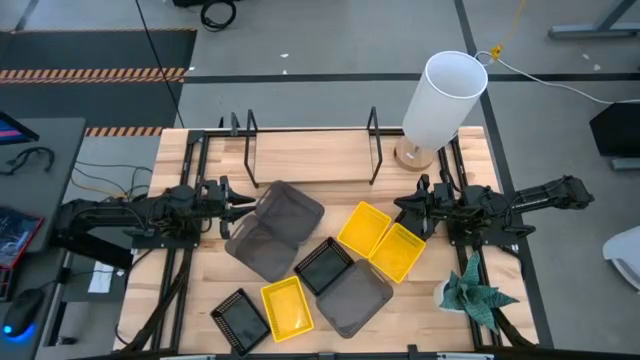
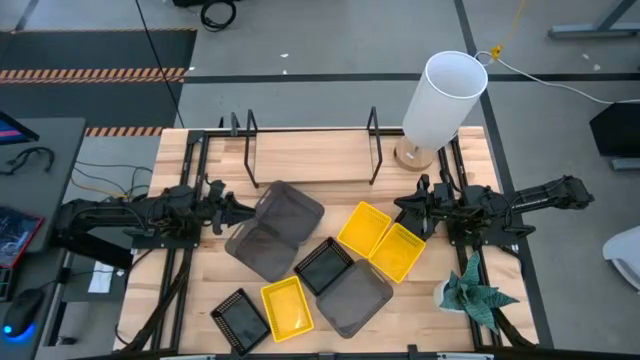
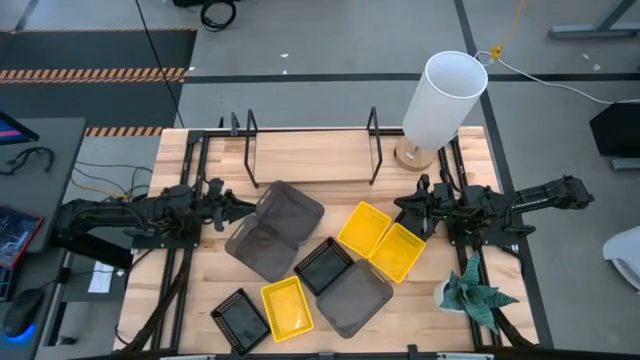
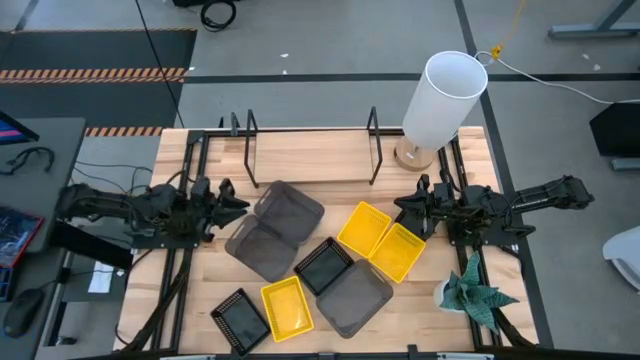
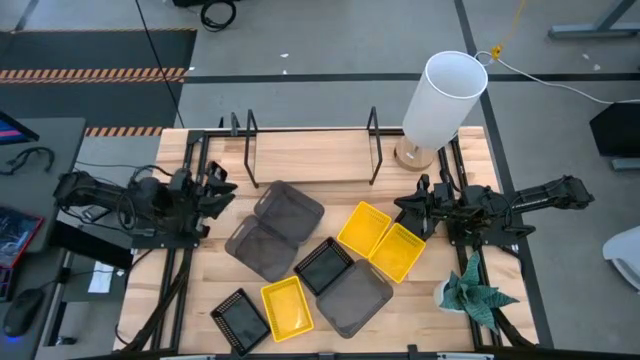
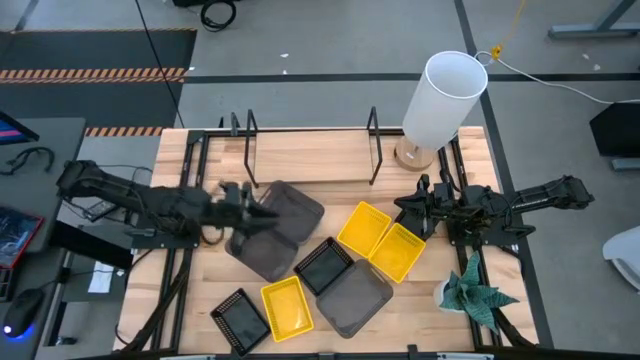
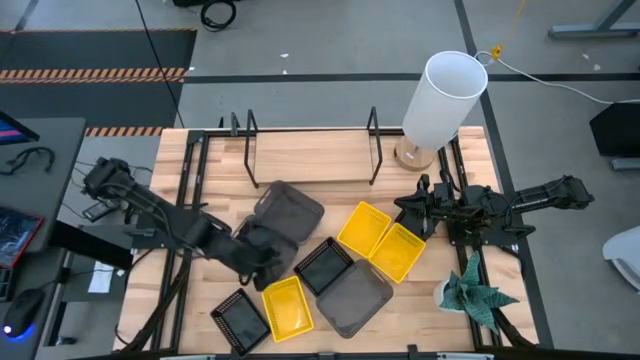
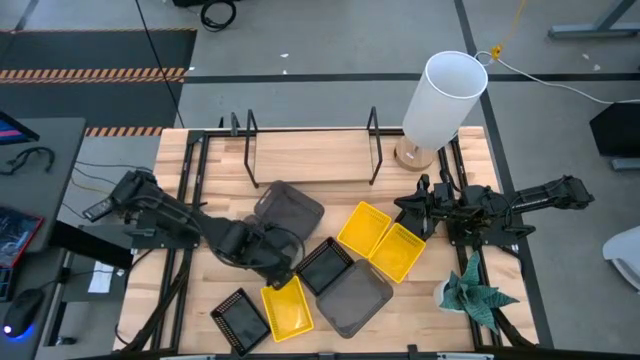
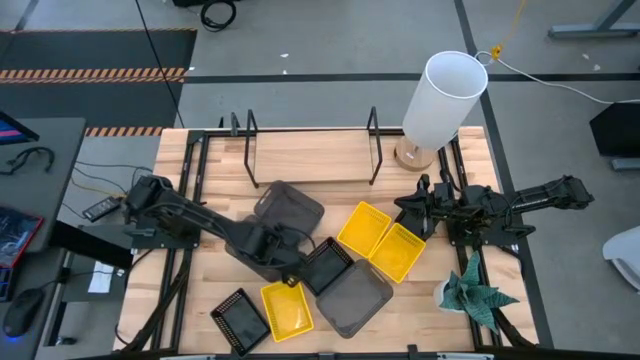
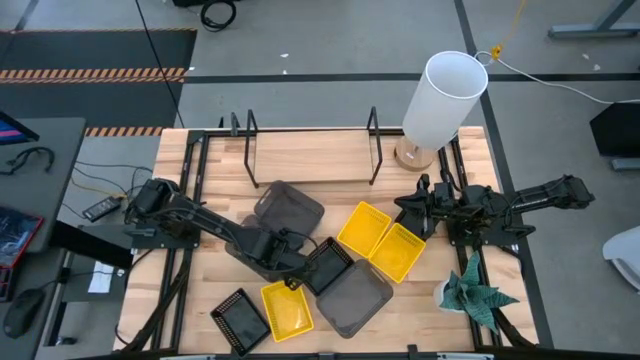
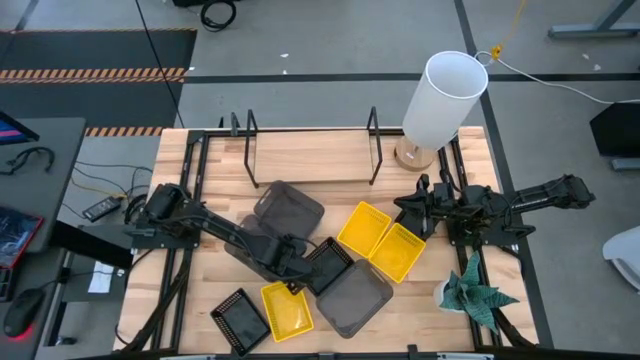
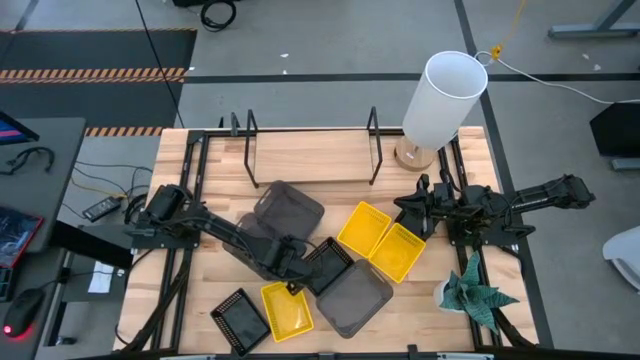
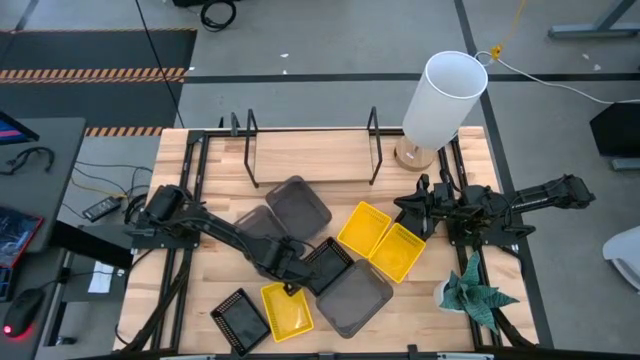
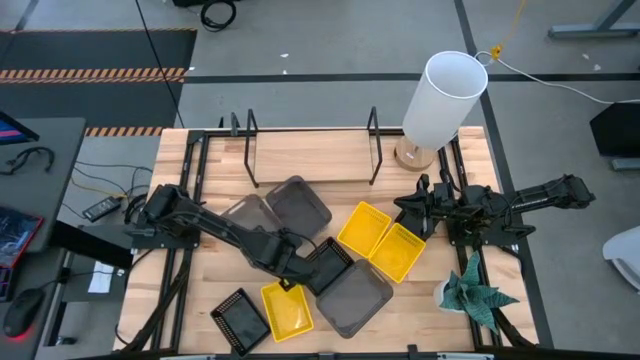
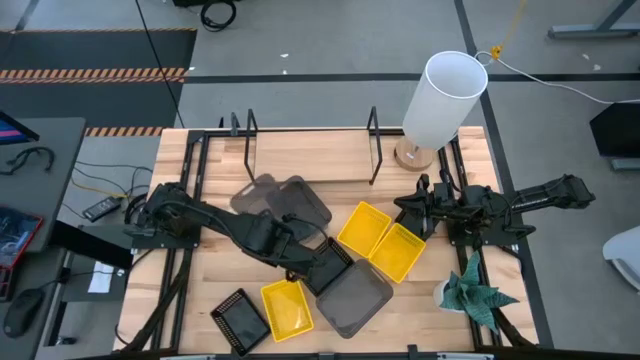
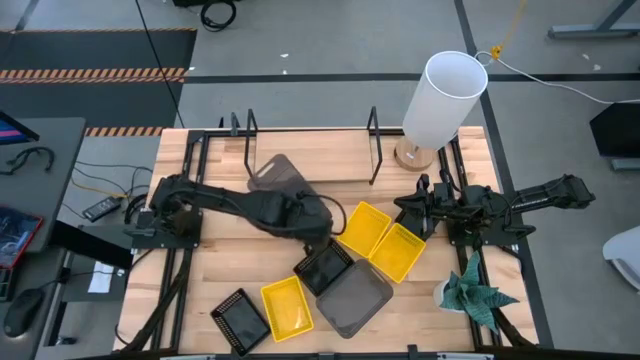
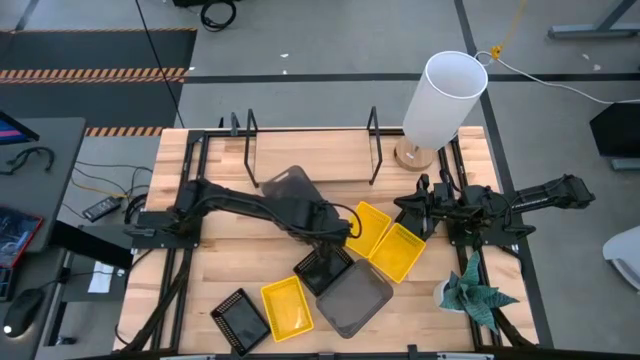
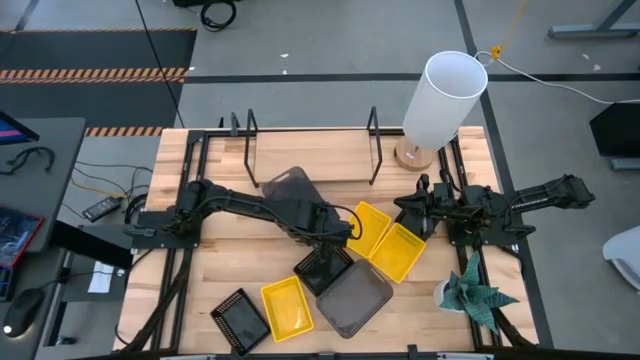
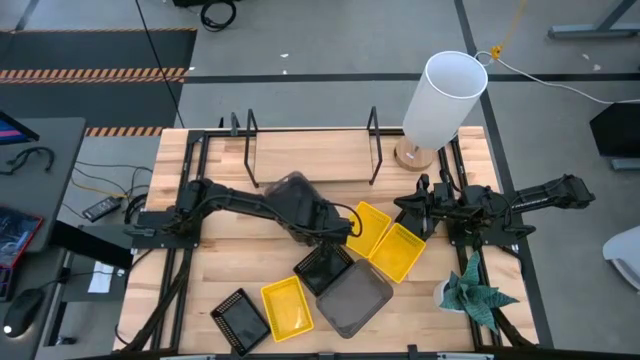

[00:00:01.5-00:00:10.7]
Task: Stack baskets on shelf by color
Stack the middle gray bin on top of the top gray bin

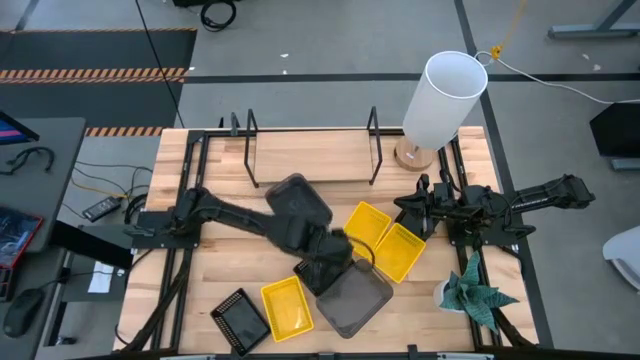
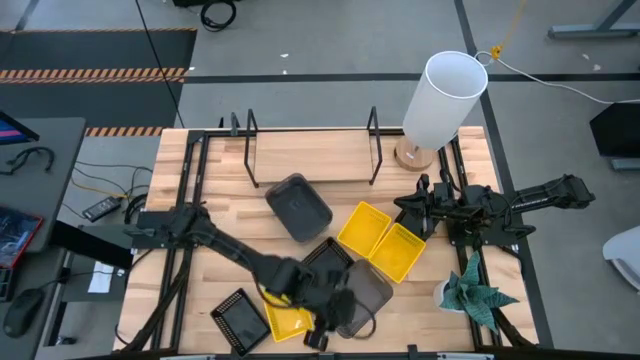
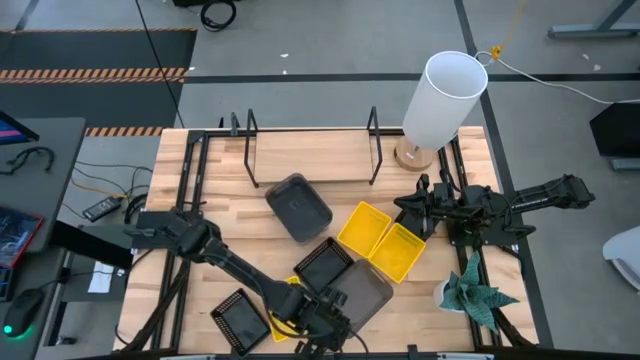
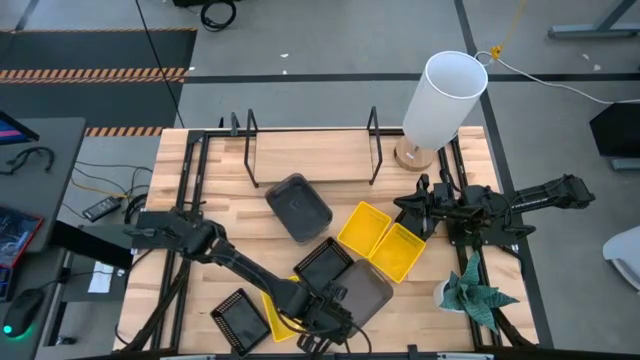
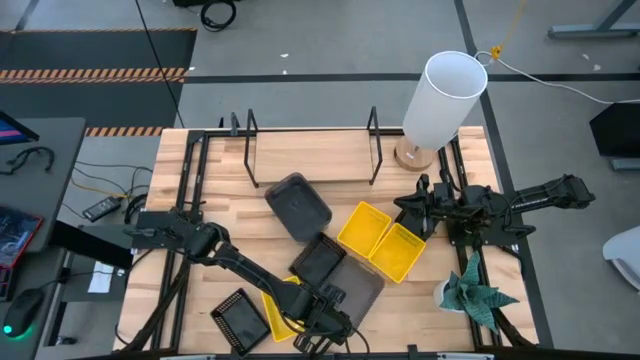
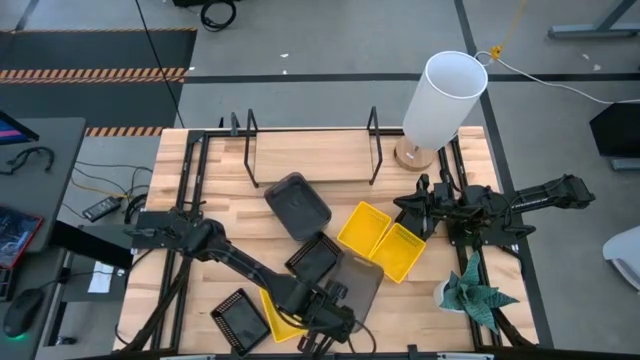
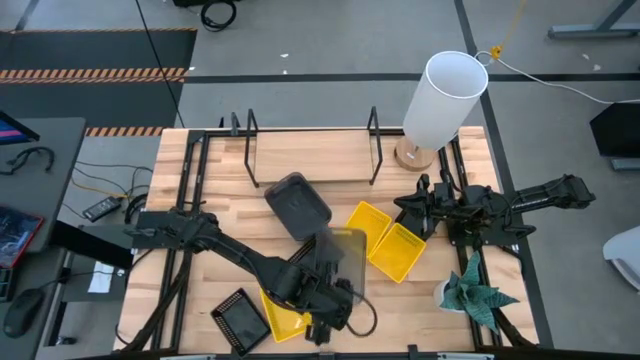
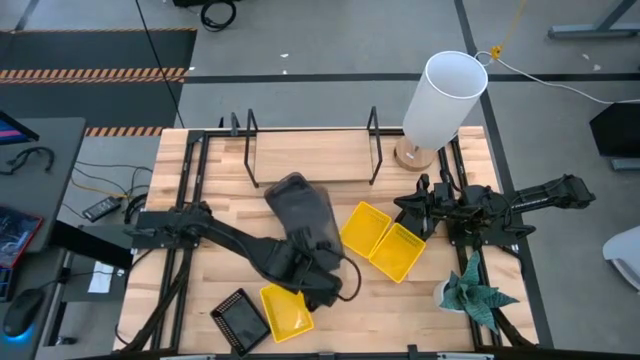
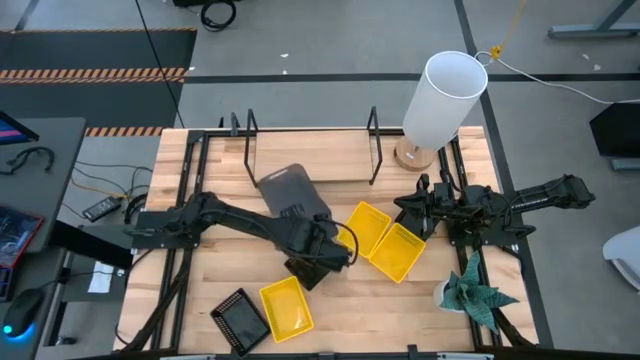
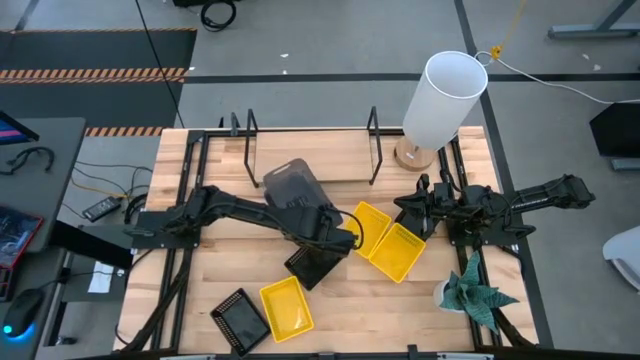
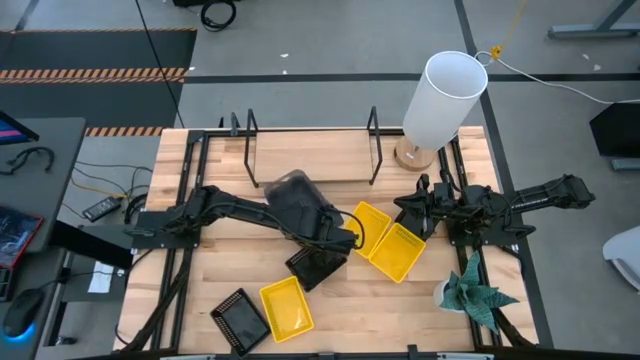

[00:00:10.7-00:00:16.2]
Stack the bottom gray bin on top of the top gray bins

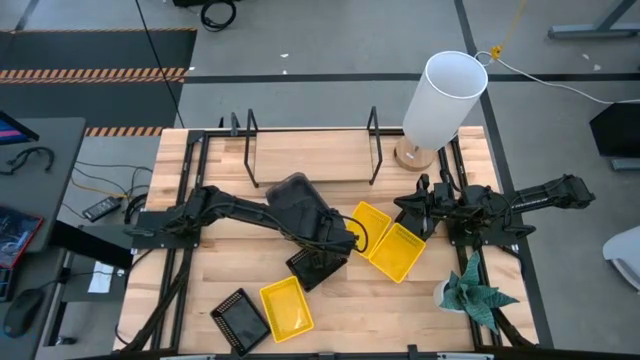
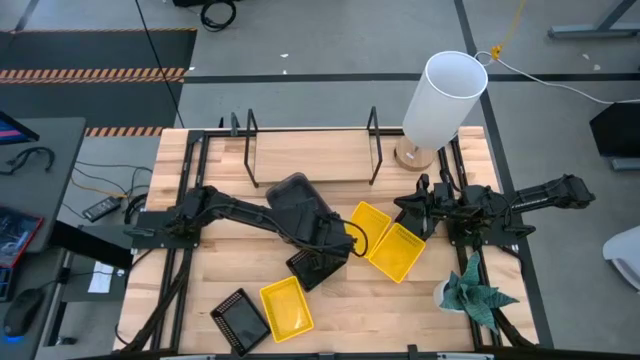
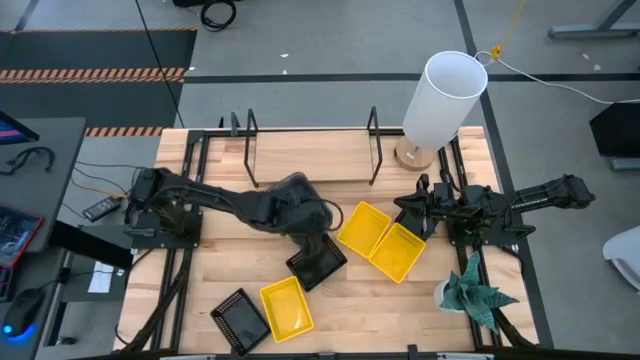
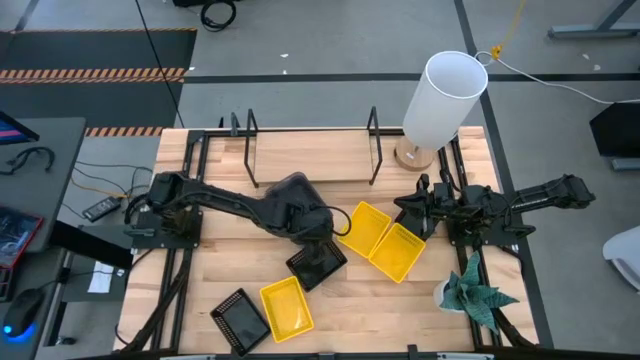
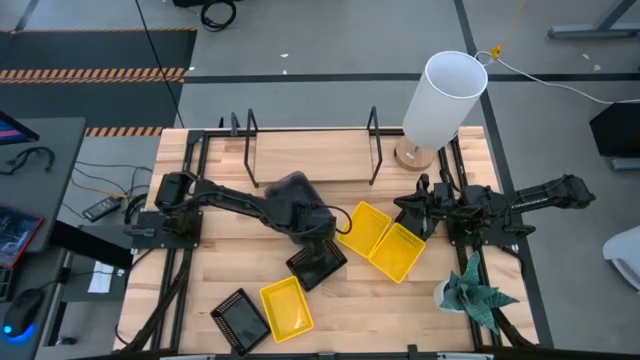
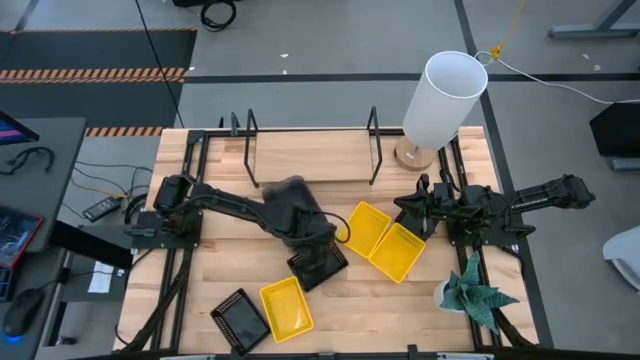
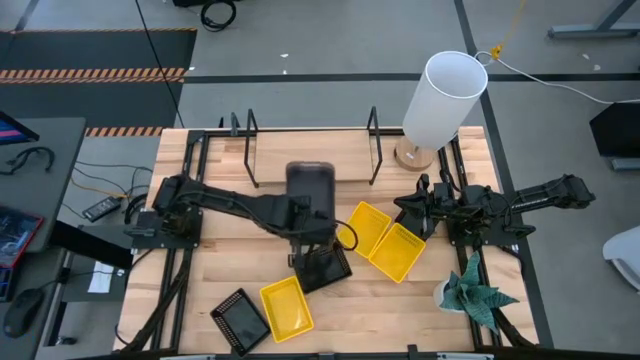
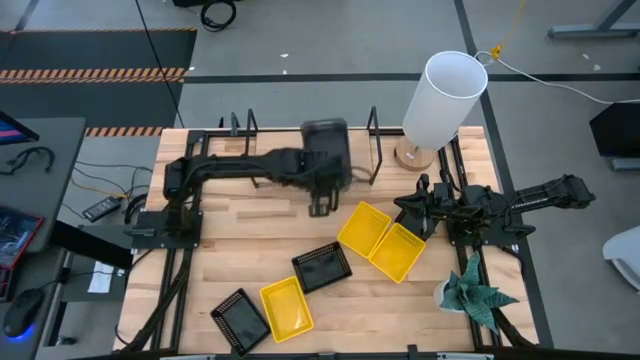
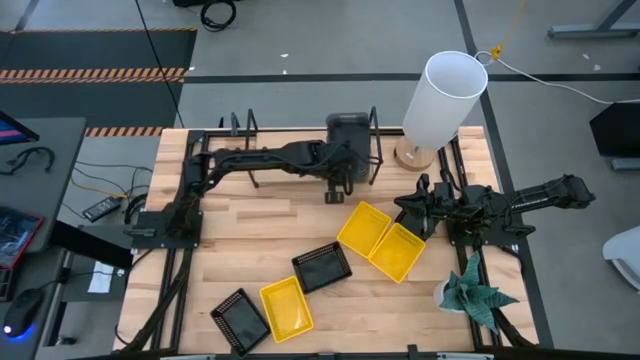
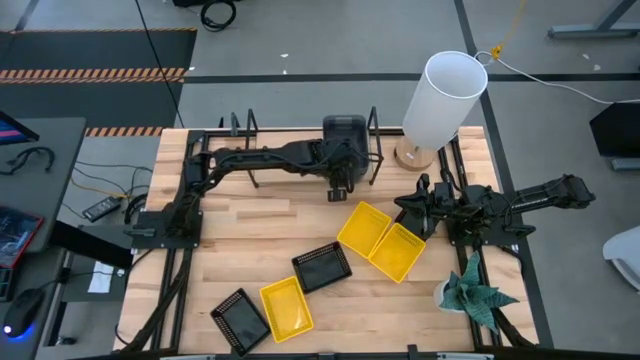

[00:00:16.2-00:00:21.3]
Put the stacked gray bins on the shelf

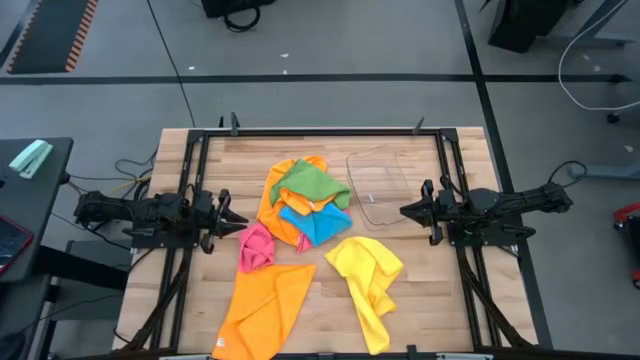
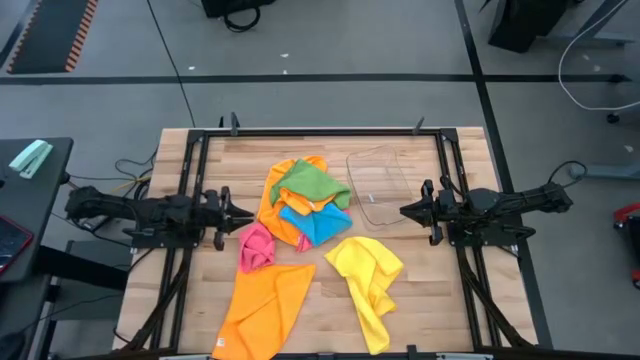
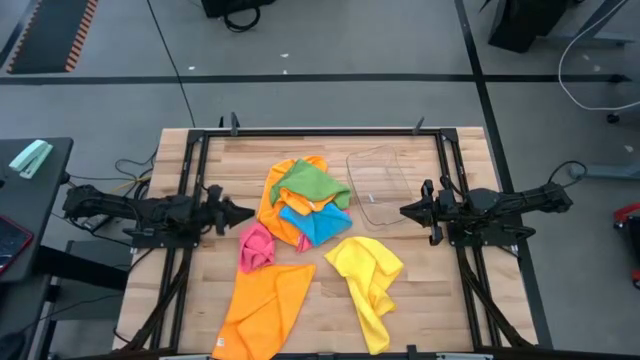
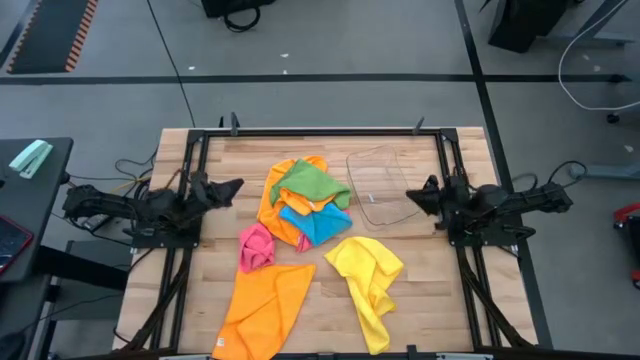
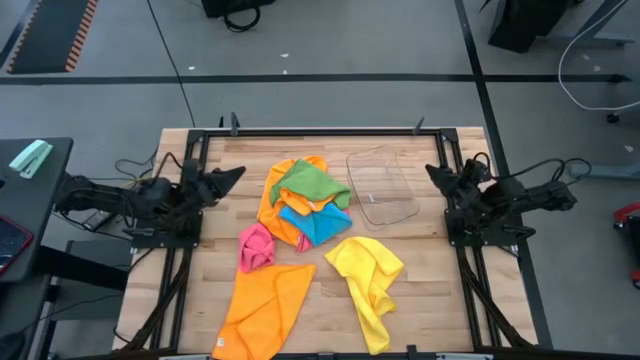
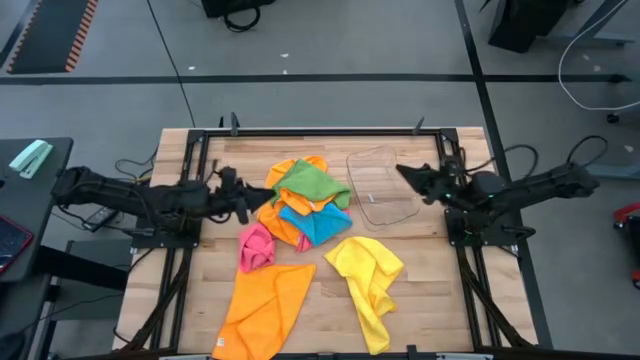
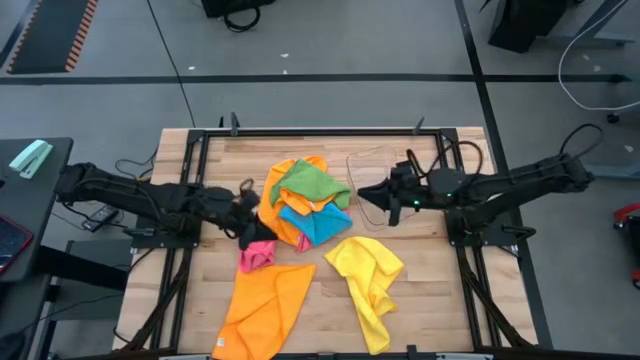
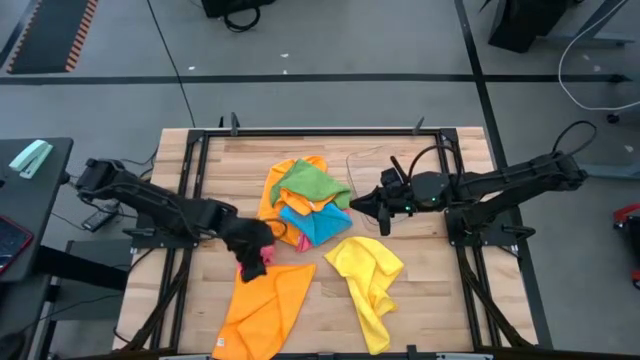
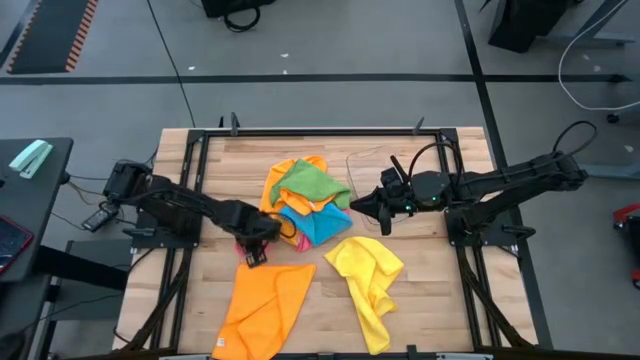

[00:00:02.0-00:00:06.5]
Task: Fold microfiber towels
Move the left pink towel to the left center
